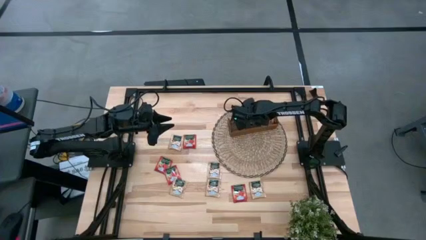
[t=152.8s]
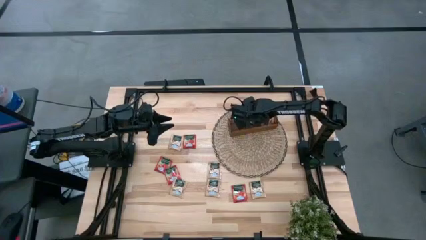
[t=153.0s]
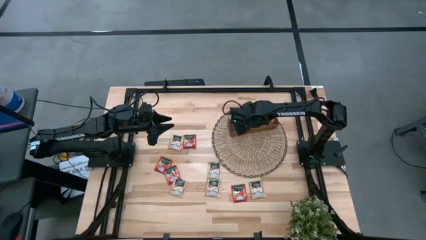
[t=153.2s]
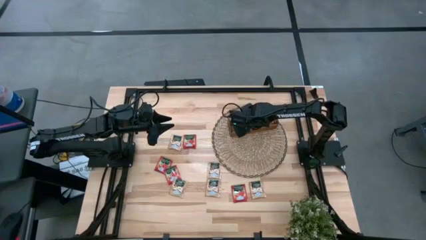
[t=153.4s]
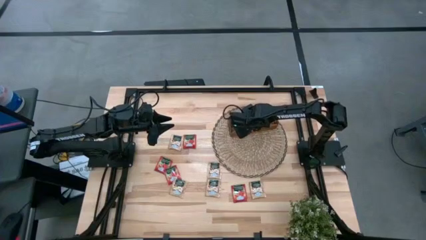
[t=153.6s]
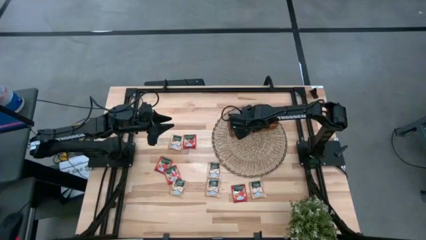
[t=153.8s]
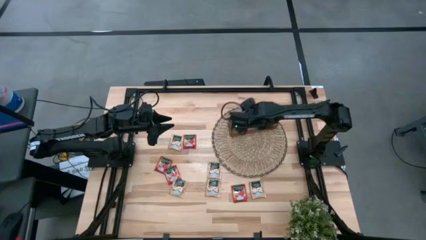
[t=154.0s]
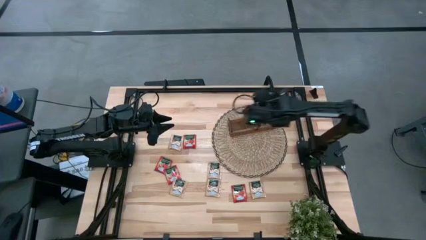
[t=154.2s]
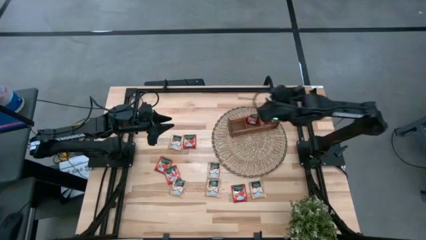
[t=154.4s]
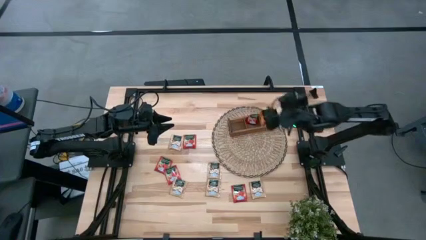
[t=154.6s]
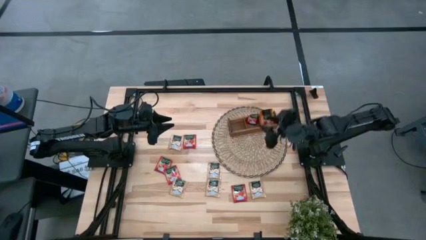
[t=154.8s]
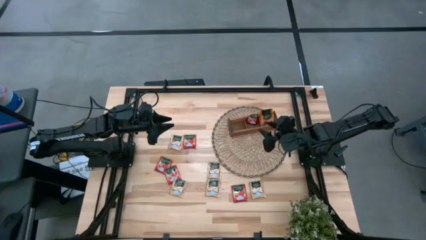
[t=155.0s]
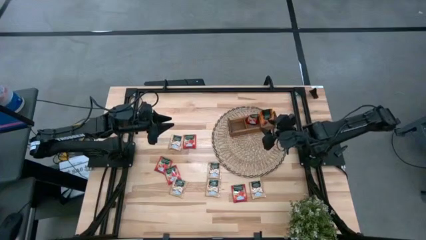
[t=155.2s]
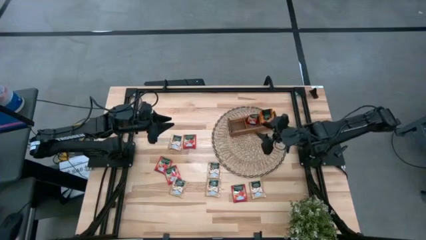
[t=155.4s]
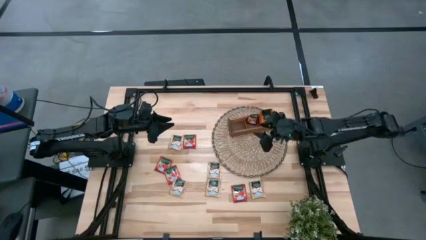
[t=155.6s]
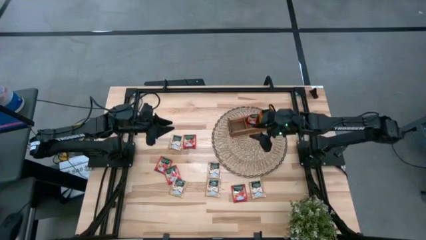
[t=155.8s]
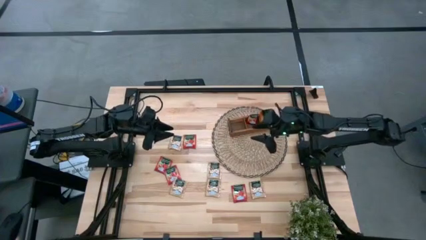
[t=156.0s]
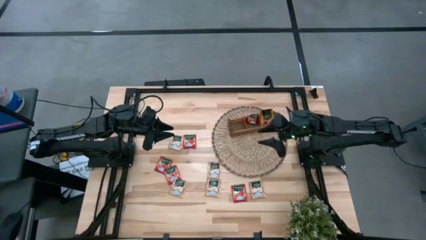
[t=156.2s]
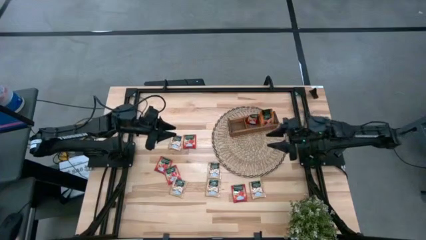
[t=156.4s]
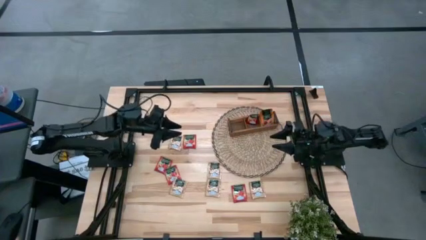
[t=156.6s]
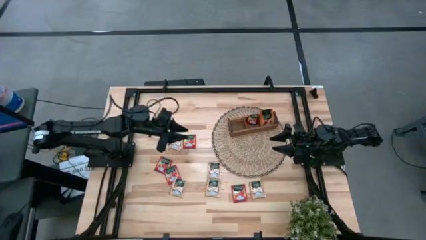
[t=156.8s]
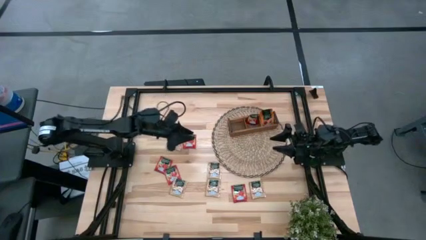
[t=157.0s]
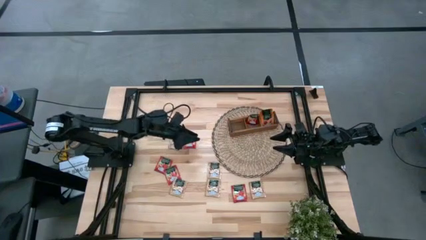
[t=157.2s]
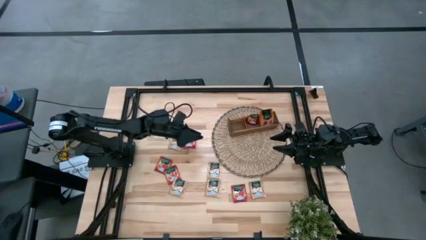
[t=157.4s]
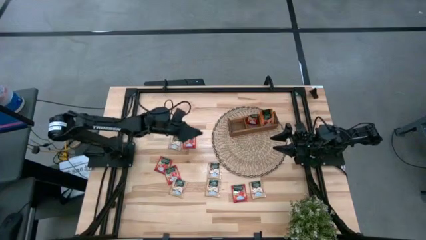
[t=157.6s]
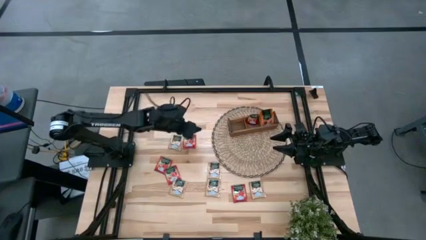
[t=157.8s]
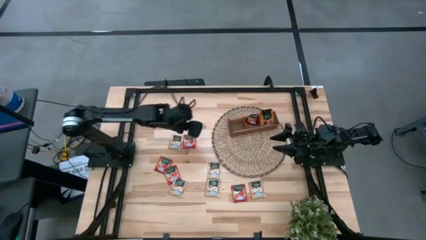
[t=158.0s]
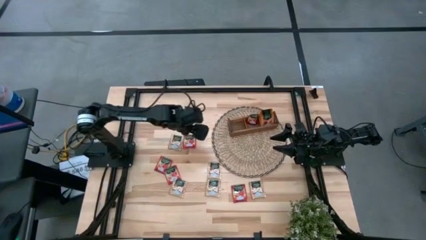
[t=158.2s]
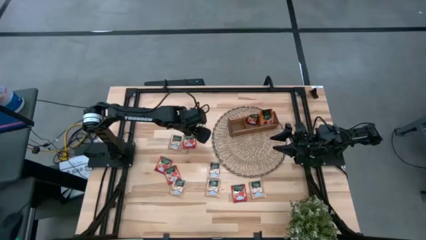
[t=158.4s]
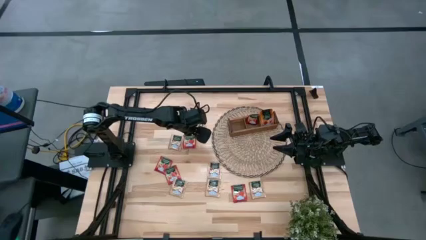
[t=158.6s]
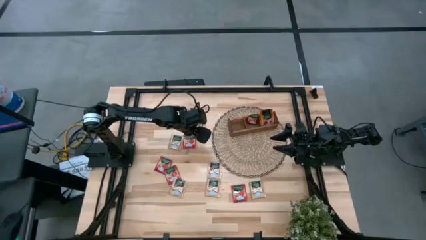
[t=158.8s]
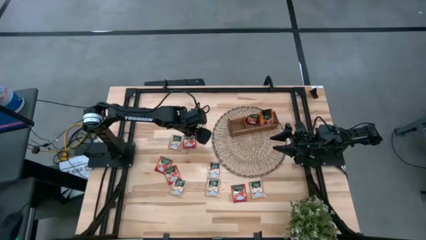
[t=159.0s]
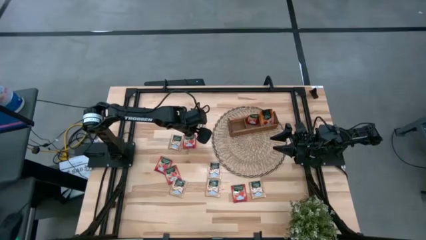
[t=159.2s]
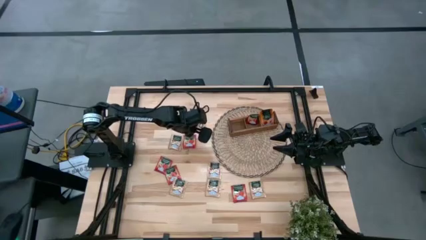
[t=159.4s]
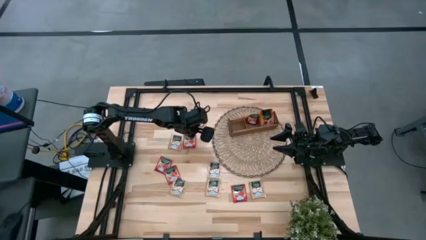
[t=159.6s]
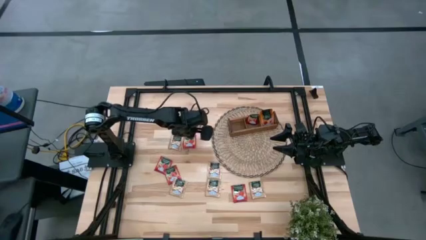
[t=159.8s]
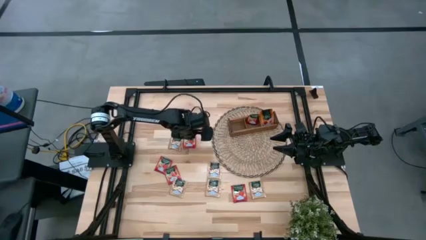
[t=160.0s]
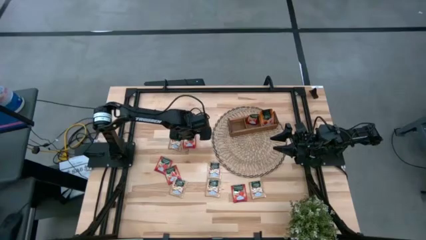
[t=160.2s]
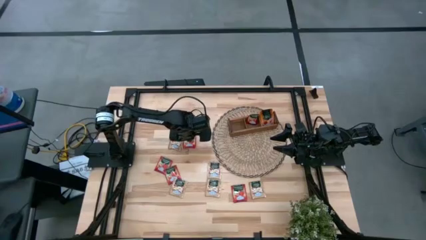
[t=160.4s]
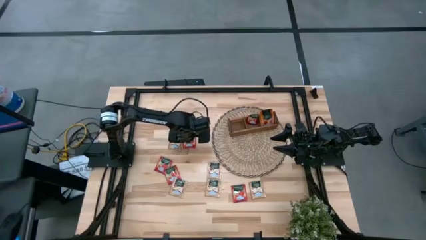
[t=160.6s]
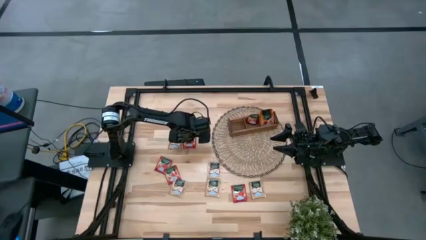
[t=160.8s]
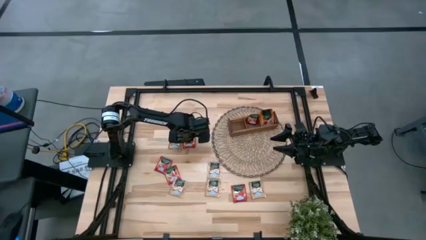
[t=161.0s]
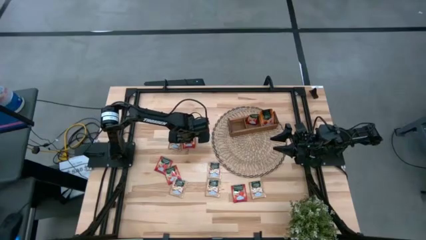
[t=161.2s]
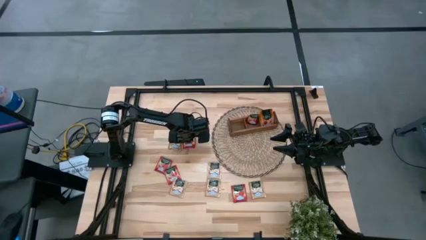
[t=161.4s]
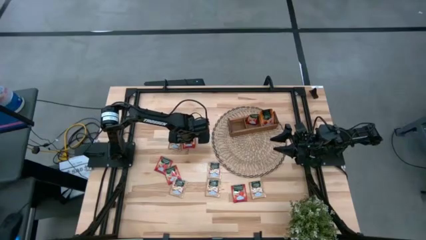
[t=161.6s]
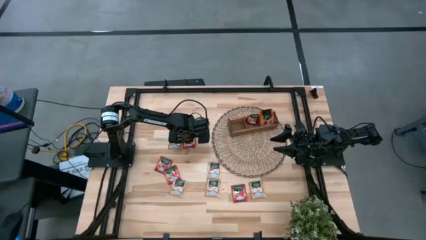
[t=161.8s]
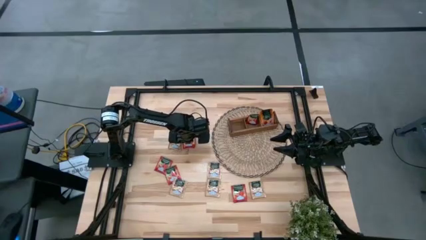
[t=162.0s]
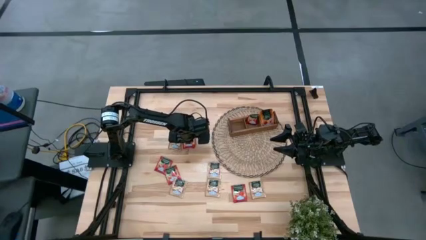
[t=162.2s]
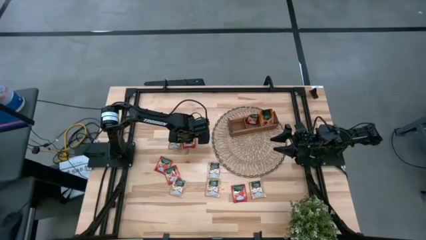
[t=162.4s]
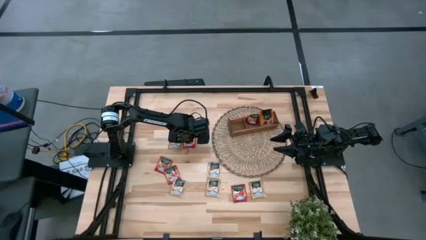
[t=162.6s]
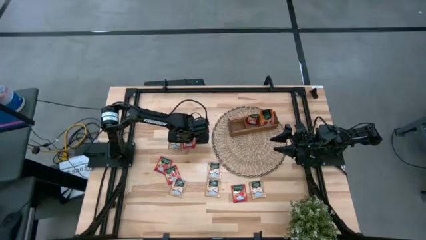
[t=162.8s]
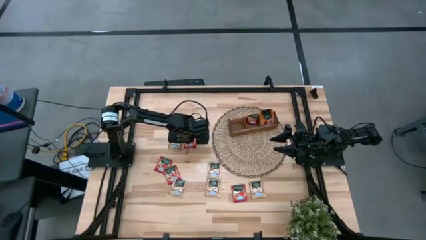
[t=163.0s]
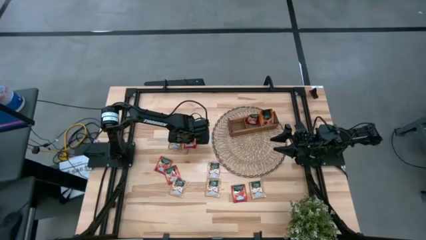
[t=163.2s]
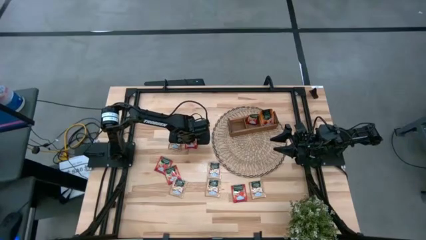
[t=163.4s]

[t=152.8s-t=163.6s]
Task: Pick & Place Tea
Put the red tea pack into the middle compartment of the brown organizer
